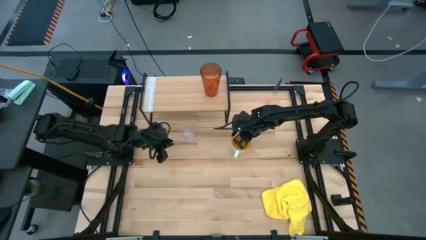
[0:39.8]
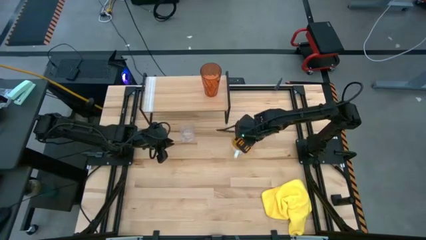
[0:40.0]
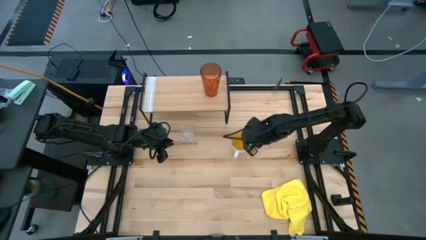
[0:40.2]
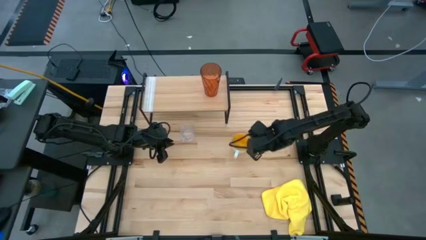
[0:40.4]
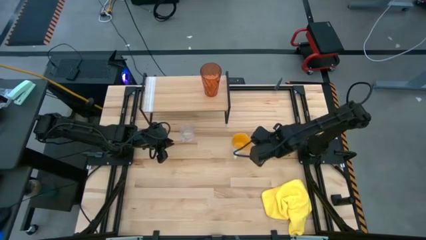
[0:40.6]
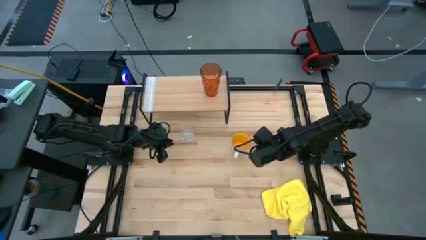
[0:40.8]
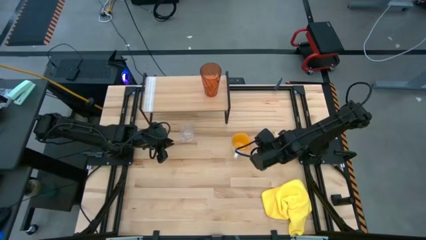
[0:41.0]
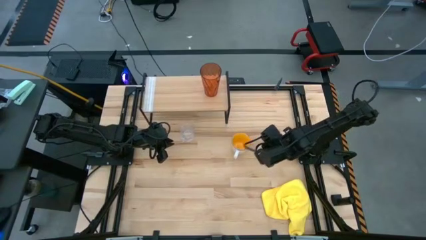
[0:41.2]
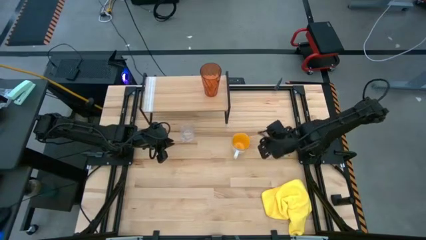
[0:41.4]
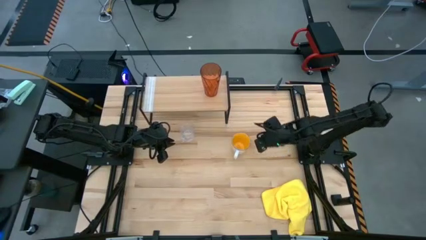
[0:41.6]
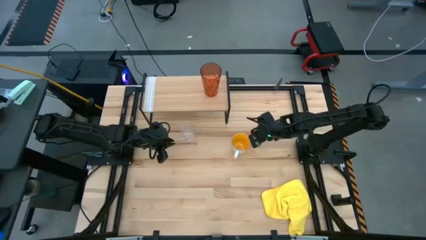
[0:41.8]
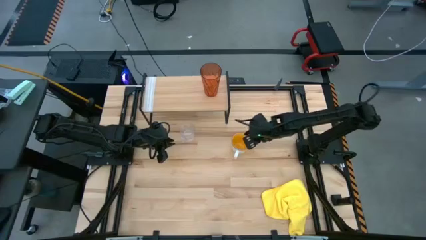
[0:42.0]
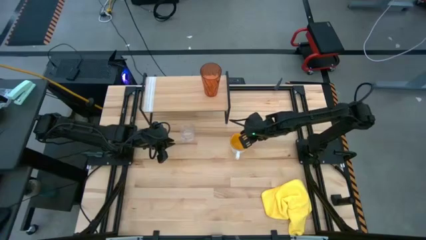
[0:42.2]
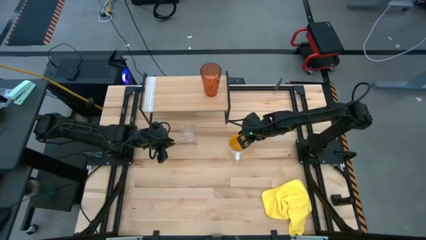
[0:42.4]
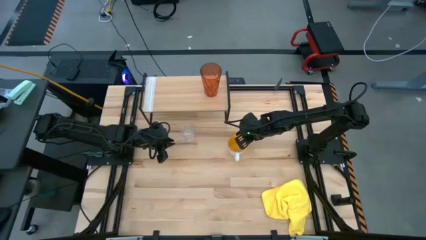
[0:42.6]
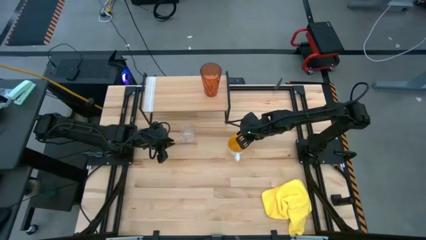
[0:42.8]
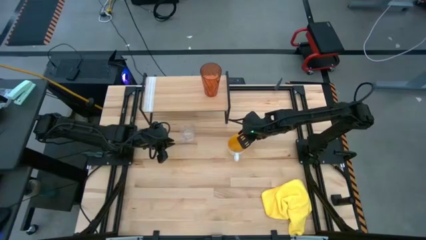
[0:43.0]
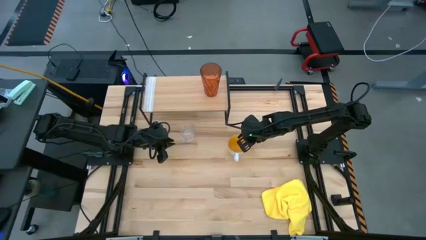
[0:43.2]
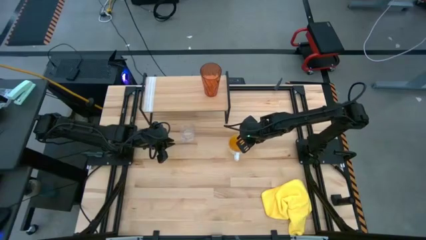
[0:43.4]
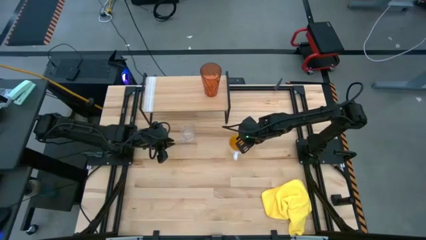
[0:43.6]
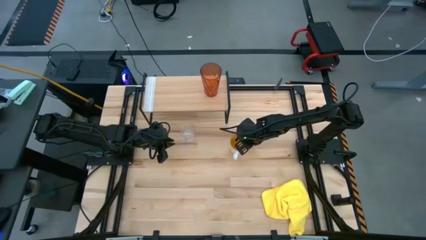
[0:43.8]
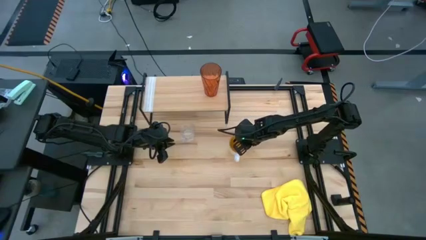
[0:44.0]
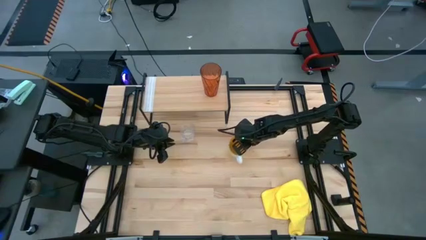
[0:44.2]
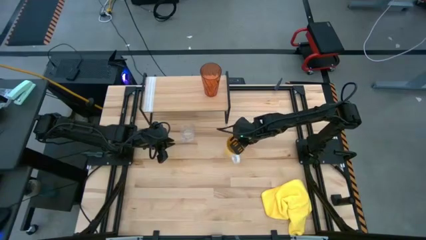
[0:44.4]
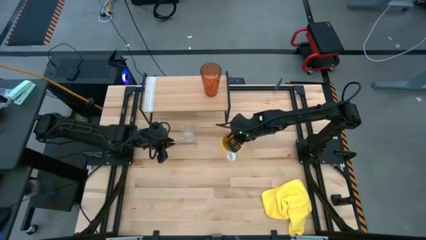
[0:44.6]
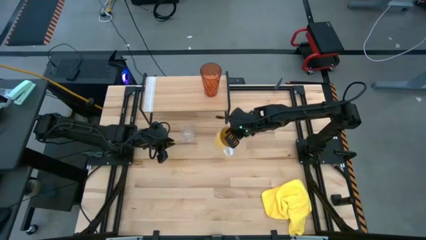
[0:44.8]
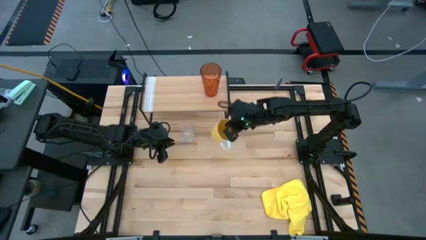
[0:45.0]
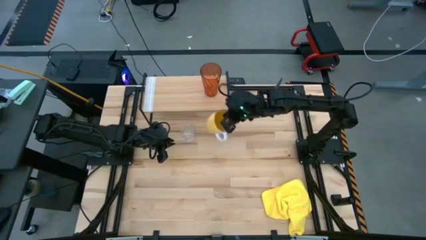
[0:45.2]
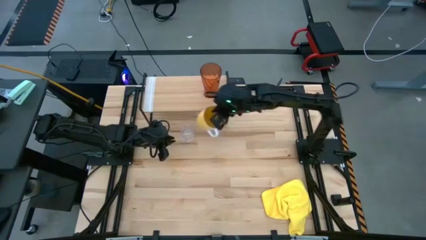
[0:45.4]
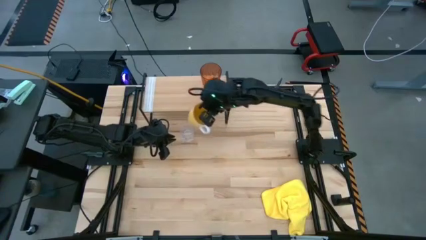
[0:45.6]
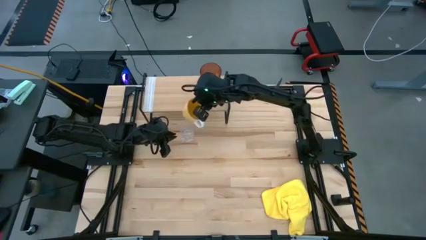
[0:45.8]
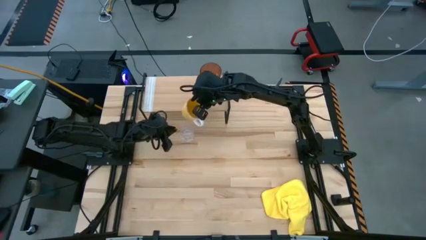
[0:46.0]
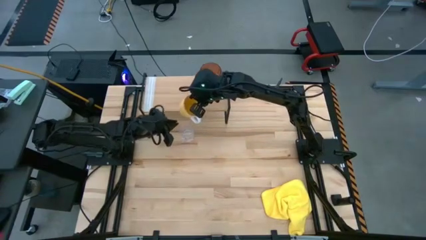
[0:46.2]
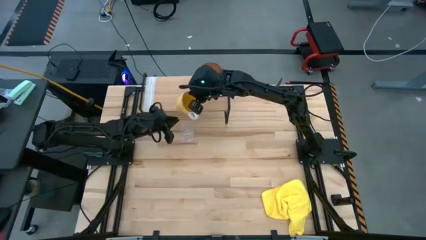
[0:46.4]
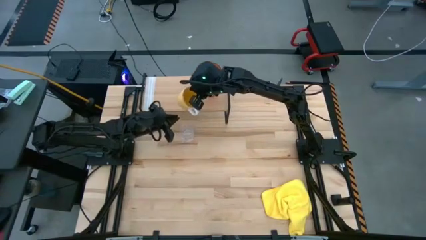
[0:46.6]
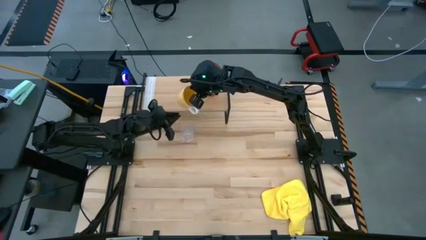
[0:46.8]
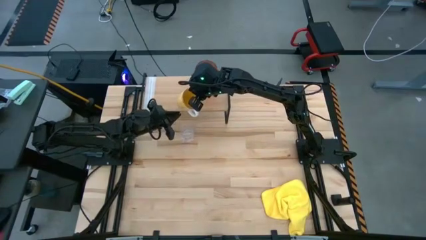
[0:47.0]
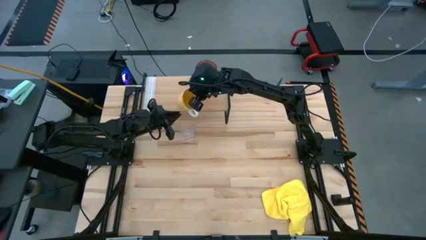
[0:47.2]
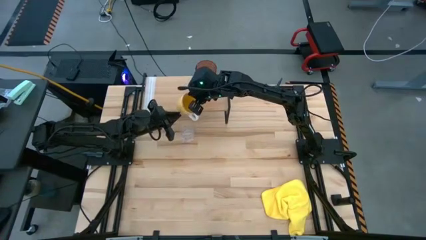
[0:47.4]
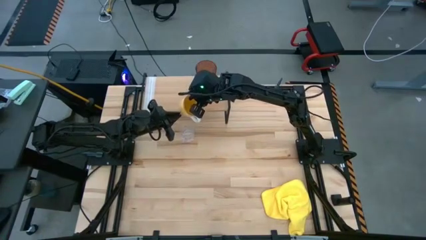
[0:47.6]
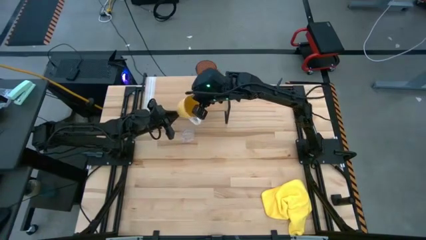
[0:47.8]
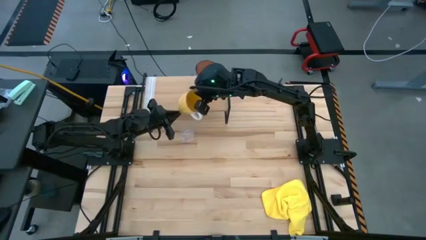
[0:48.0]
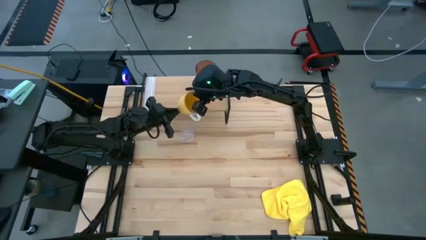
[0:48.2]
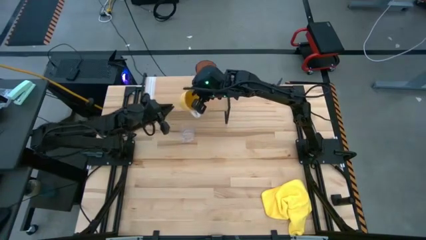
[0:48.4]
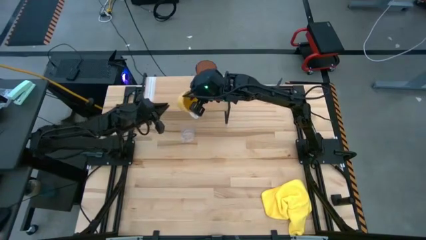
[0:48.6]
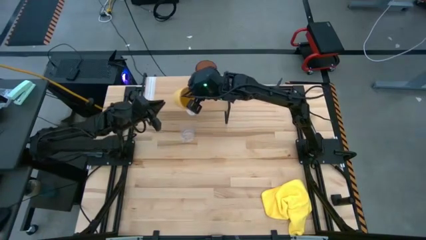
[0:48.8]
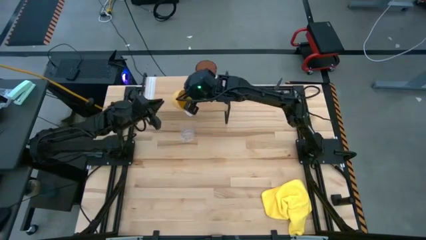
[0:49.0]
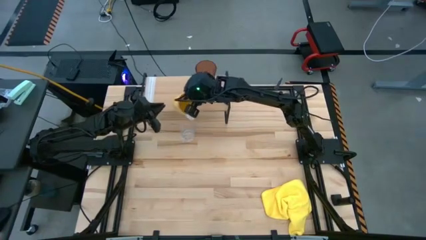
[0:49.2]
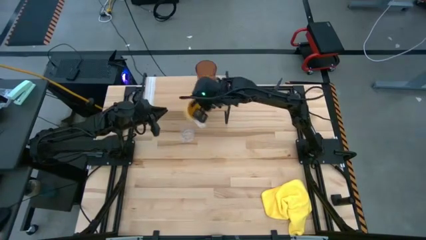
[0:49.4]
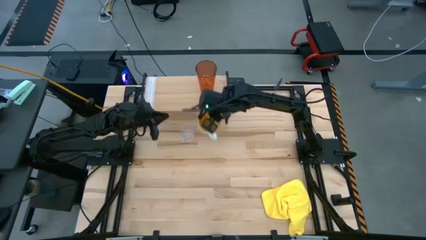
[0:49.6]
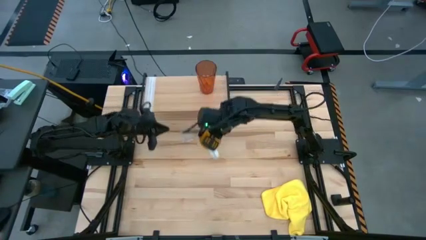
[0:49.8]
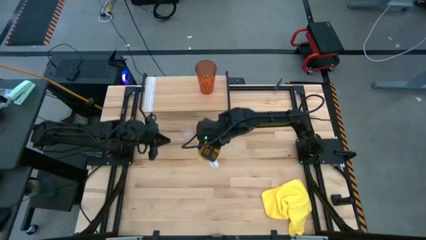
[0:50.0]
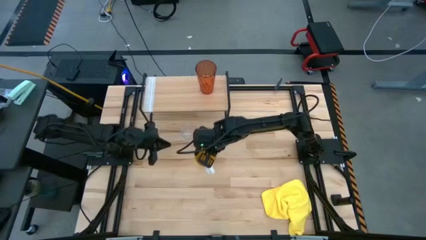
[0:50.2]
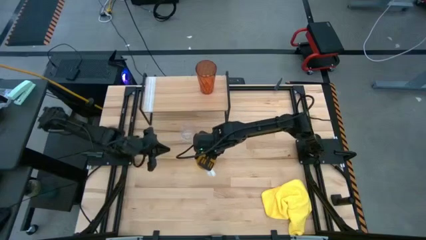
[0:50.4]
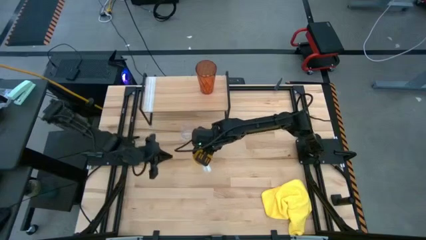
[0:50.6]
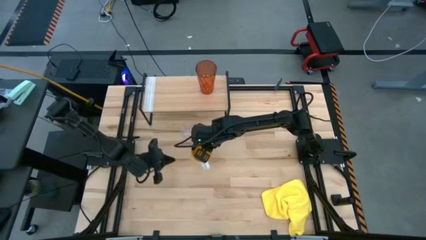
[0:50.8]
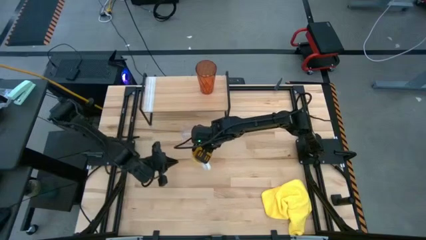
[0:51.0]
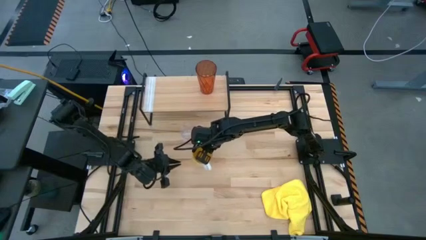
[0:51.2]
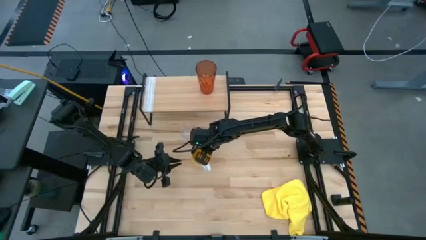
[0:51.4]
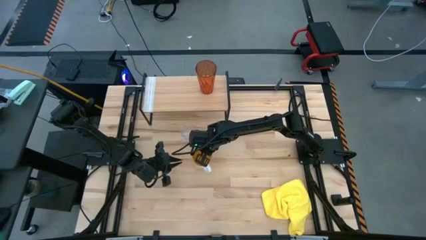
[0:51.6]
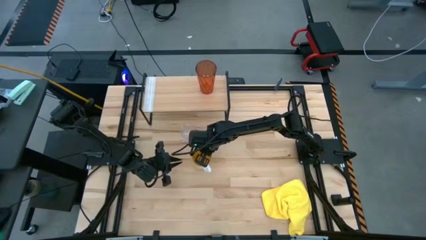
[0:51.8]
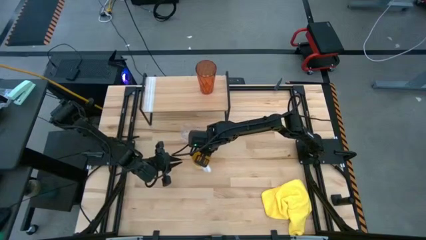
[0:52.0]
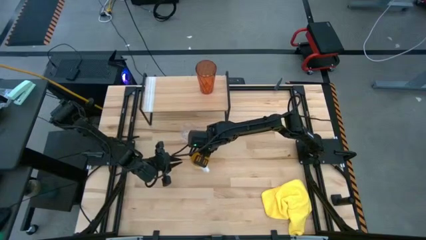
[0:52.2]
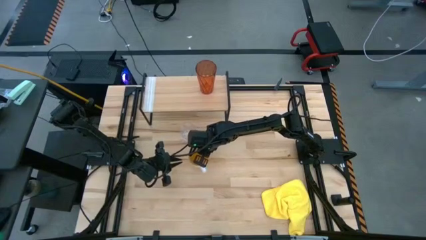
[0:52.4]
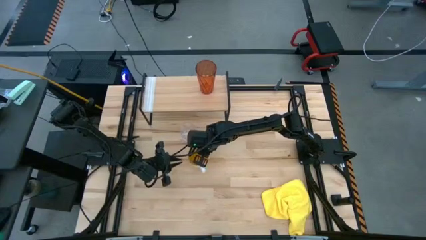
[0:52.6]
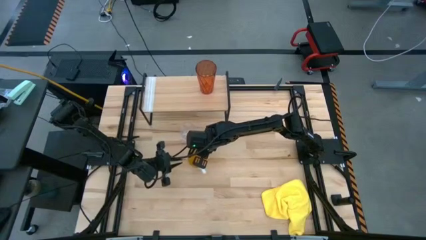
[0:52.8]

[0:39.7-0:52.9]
Task: Stack small to large cups/mugs on shelf
Put the yellow mug on the shelf
